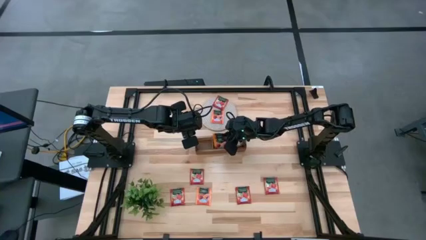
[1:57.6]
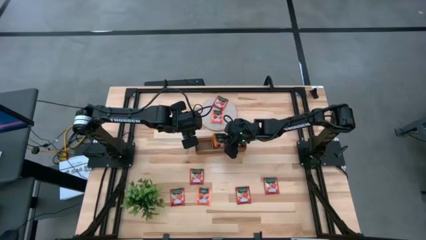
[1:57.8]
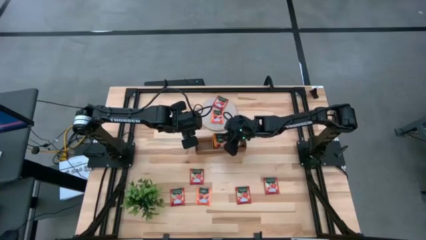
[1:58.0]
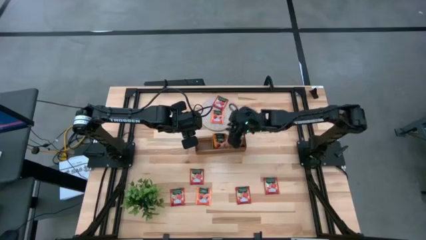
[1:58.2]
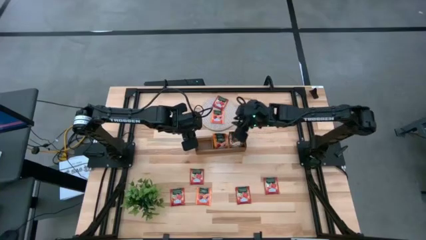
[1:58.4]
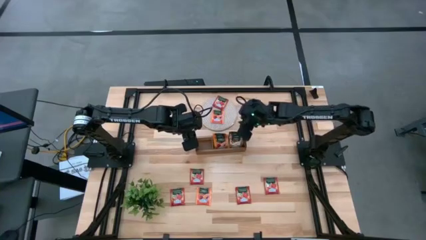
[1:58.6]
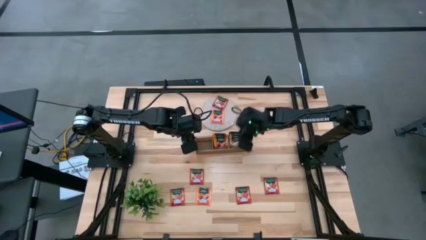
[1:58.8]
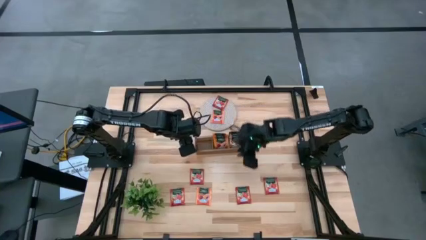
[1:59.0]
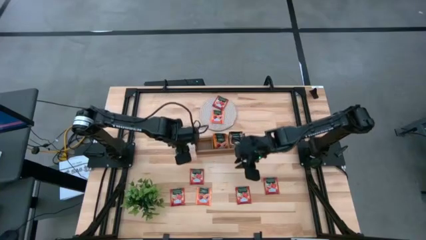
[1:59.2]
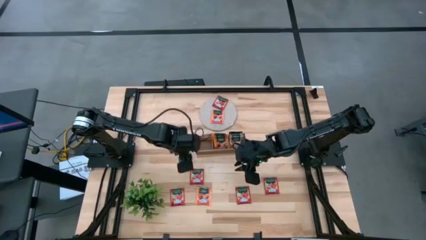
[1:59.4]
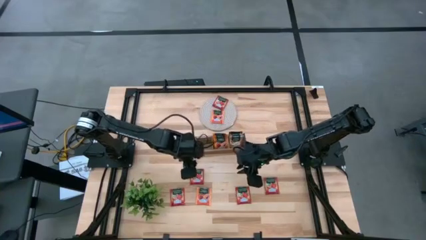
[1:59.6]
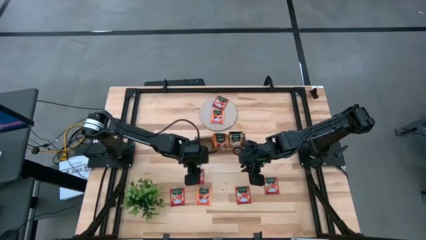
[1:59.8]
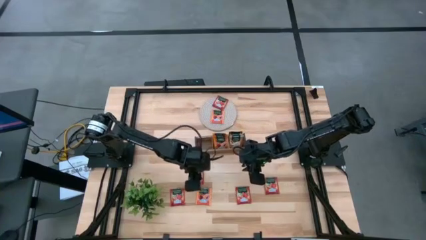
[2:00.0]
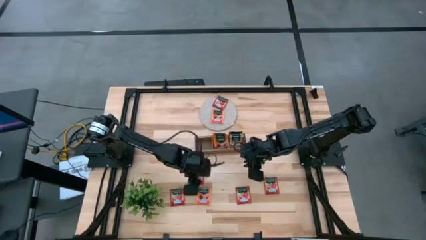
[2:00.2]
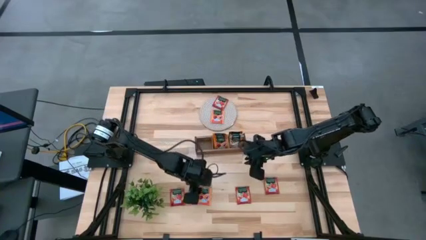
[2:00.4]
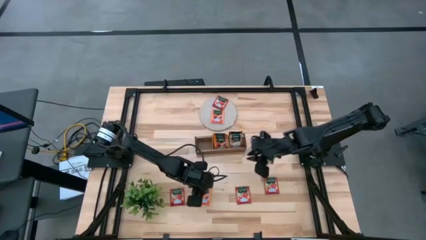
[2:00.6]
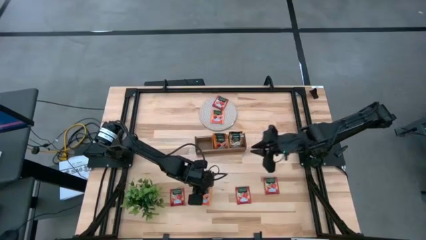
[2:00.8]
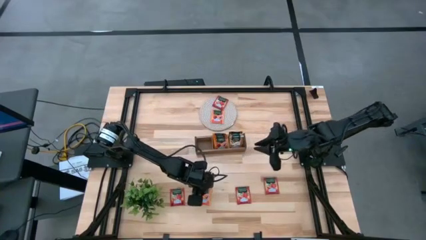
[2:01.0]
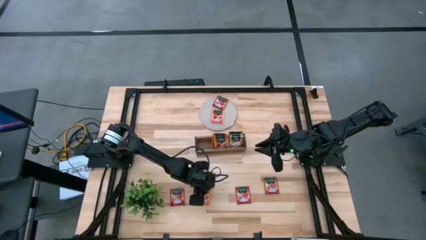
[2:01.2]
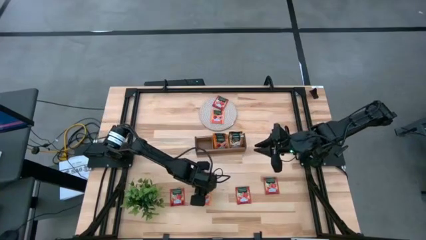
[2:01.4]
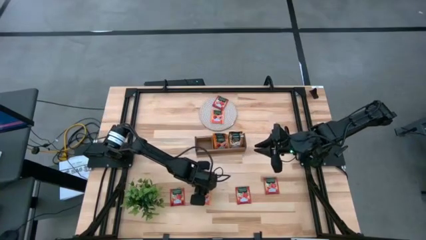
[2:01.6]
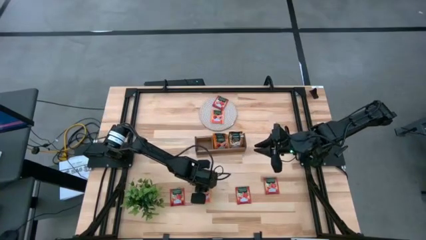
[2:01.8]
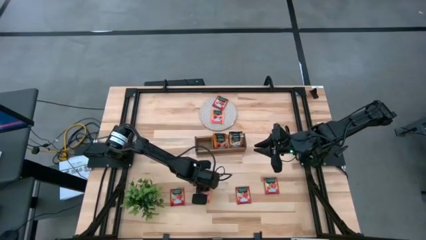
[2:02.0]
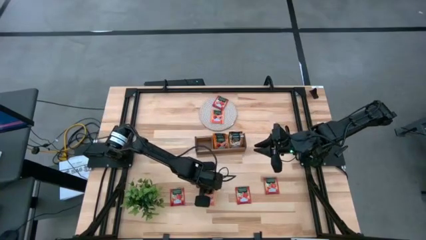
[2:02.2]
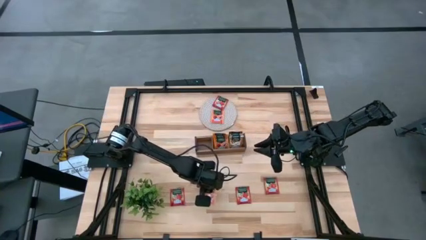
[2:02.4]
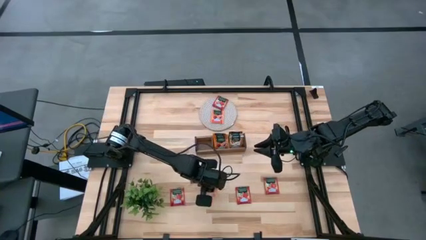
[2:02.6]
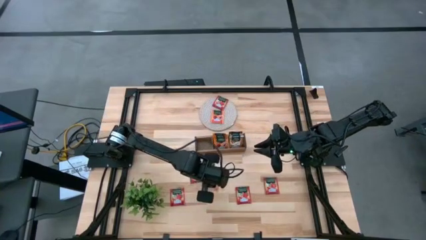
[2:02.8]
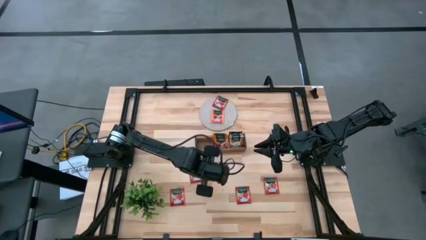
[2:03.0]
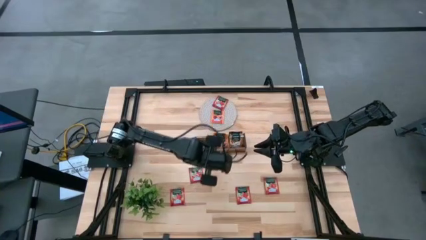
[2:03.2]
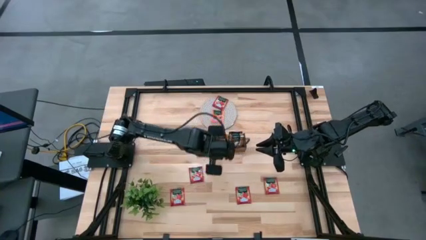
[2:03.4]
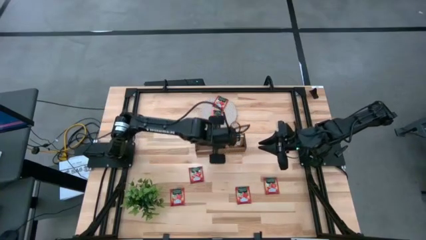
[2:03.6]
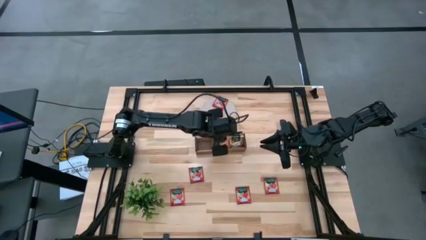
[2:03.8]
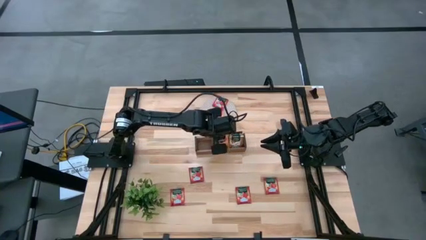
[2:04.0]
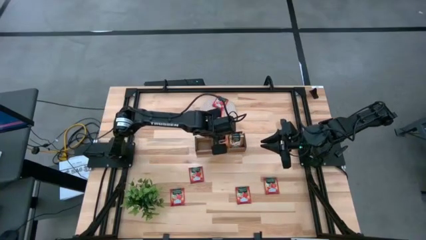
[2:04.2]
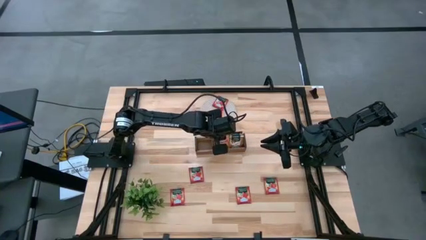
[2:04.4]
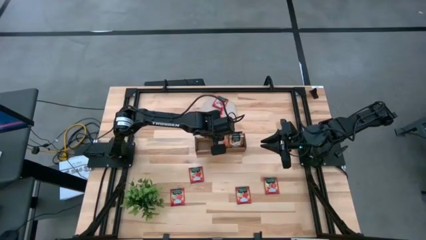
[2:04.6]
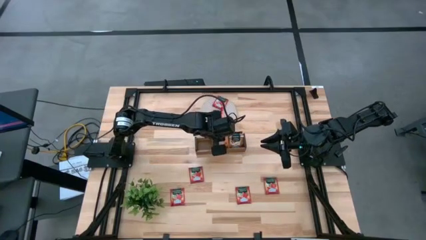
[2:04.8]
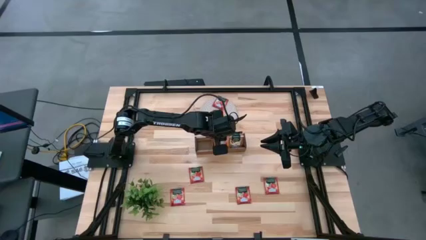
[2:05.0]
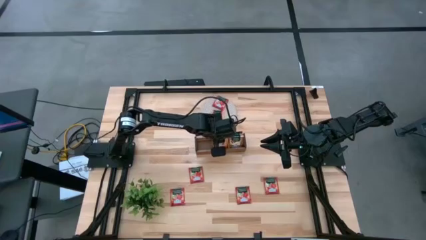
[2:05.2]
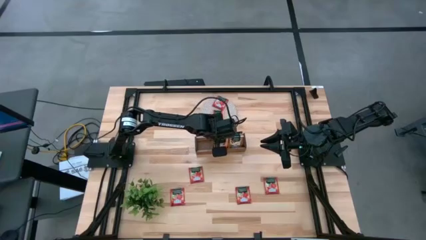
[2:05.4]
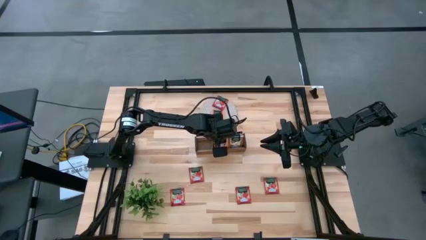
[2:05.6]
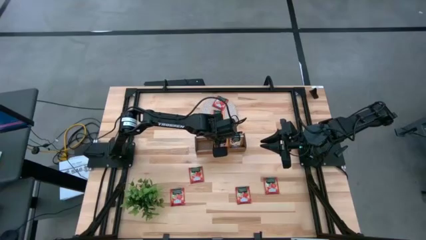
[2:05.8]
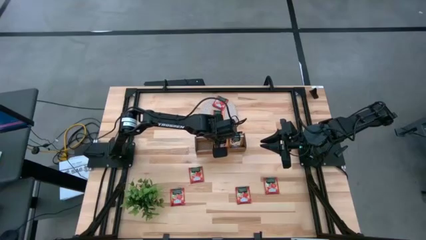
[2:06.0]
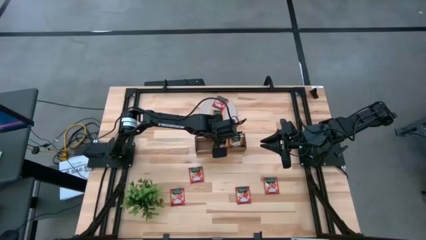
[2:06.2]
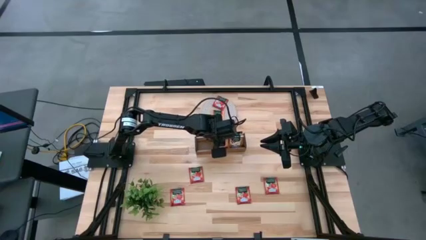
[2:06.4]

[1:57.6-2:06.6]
Task: Pick & Place Tea
Put the orange tea bag into the middle section of the wooden organizer

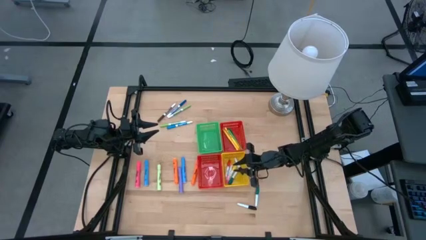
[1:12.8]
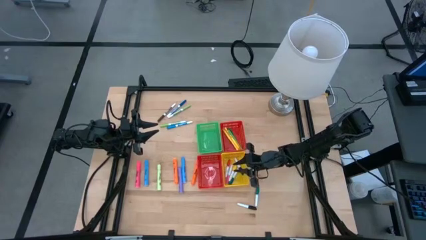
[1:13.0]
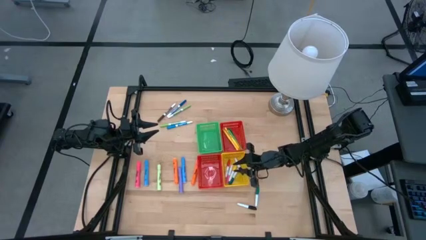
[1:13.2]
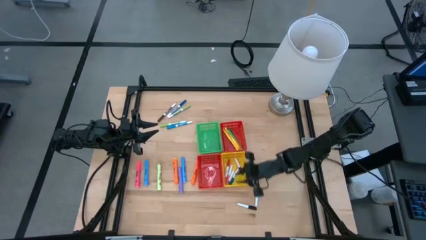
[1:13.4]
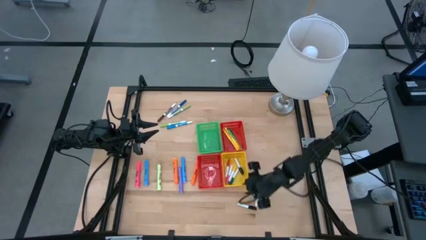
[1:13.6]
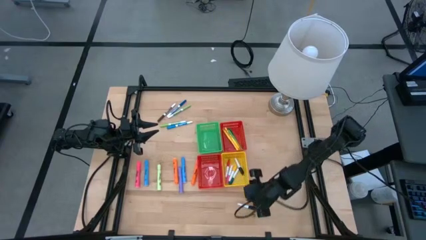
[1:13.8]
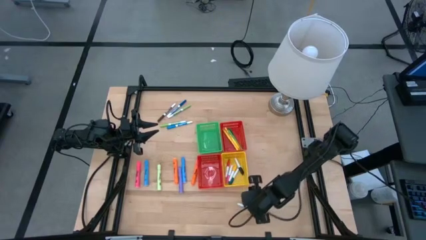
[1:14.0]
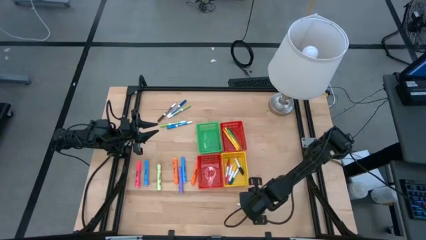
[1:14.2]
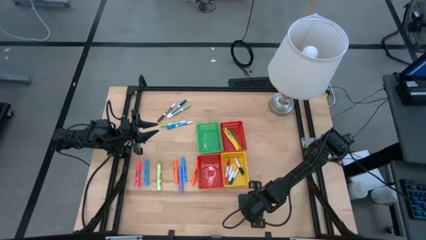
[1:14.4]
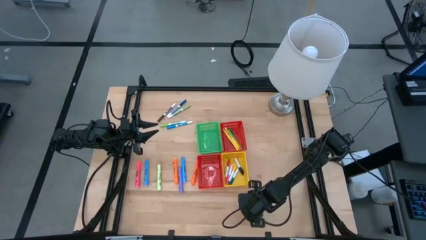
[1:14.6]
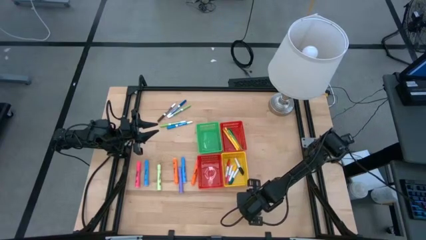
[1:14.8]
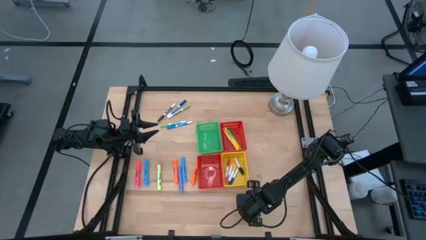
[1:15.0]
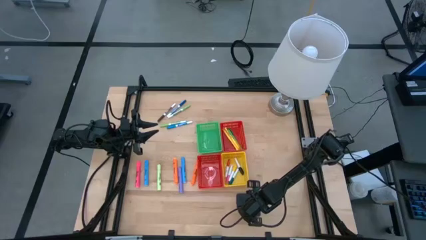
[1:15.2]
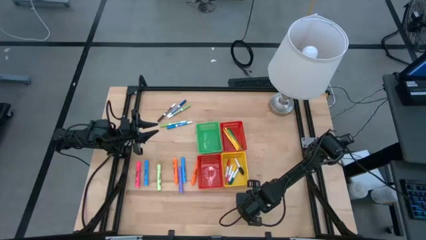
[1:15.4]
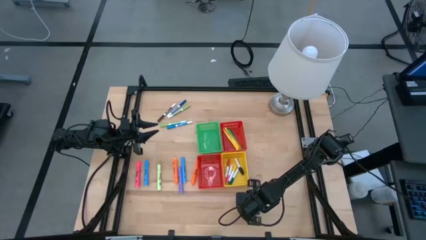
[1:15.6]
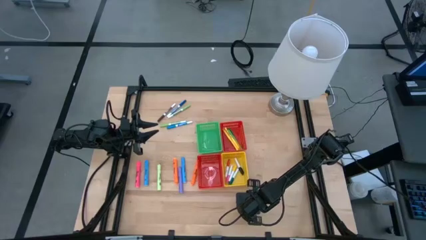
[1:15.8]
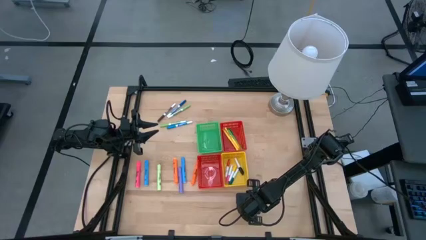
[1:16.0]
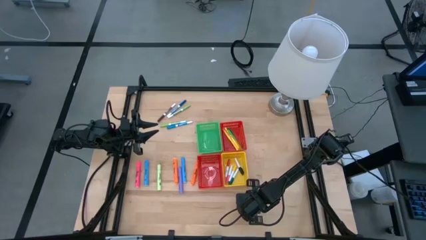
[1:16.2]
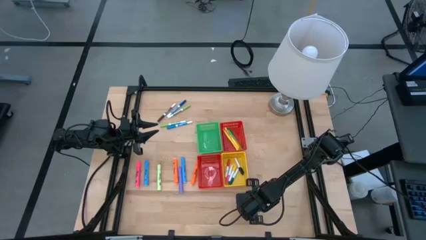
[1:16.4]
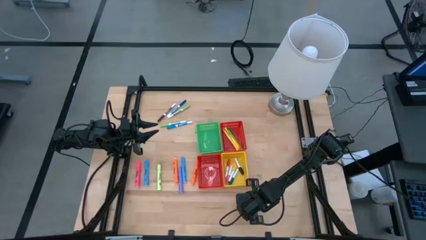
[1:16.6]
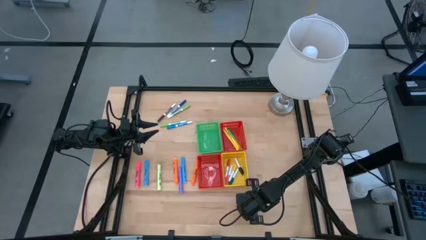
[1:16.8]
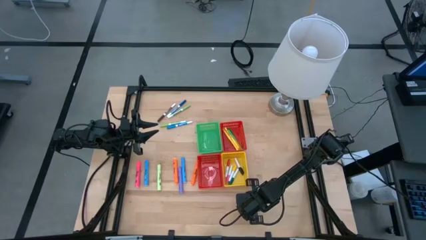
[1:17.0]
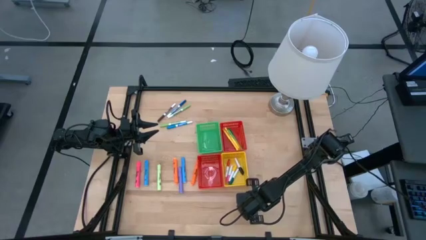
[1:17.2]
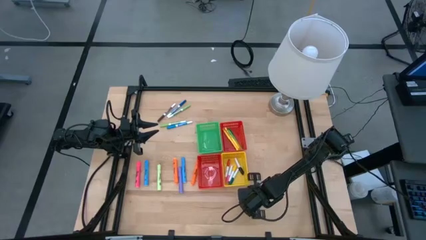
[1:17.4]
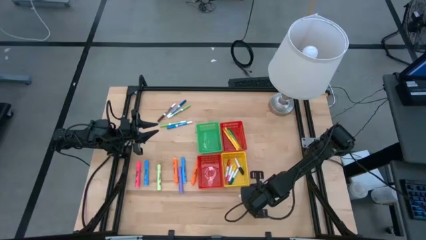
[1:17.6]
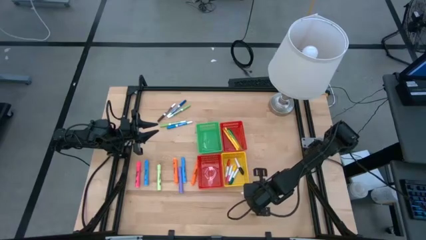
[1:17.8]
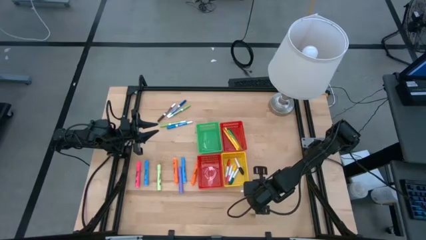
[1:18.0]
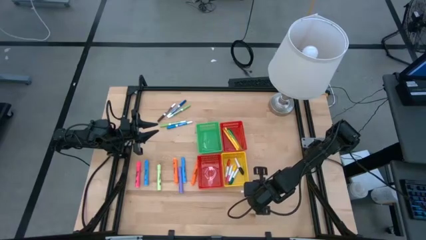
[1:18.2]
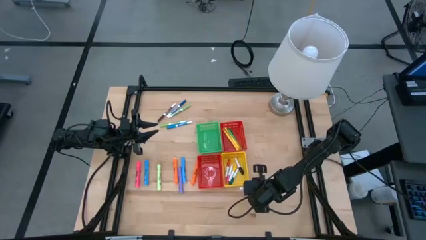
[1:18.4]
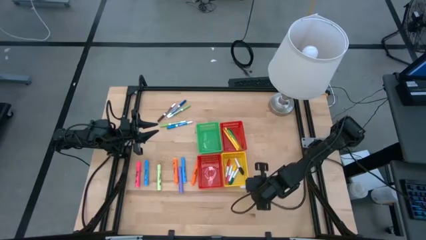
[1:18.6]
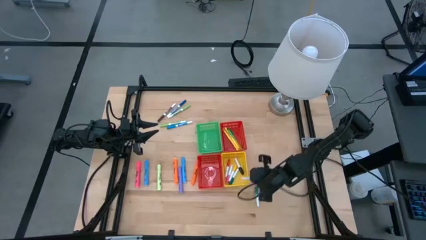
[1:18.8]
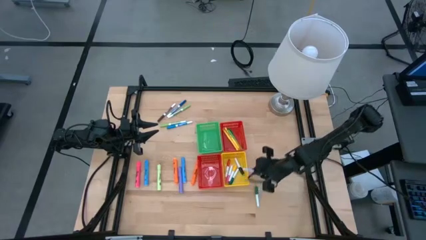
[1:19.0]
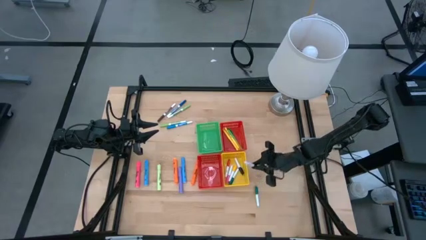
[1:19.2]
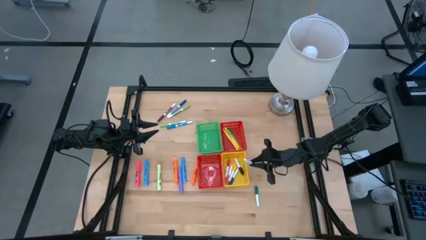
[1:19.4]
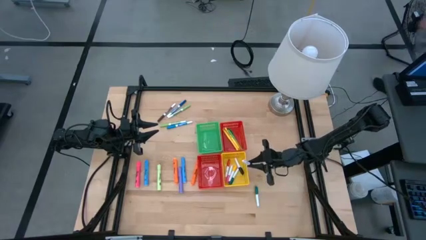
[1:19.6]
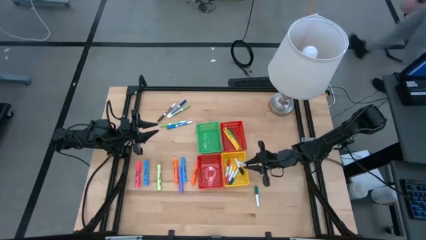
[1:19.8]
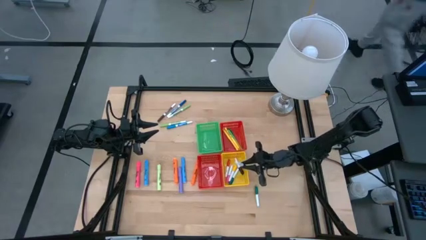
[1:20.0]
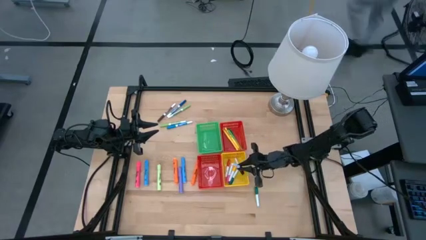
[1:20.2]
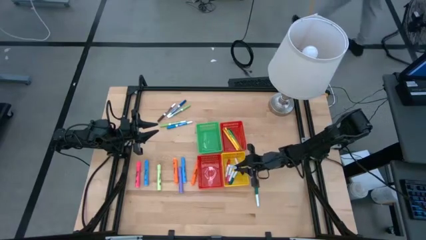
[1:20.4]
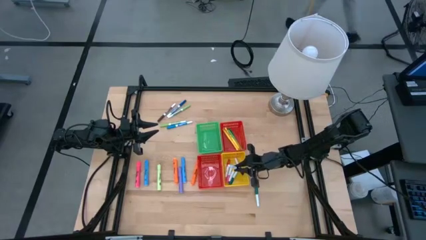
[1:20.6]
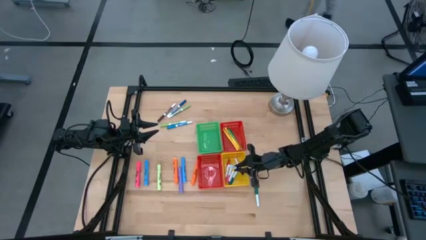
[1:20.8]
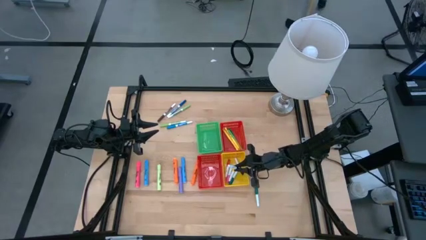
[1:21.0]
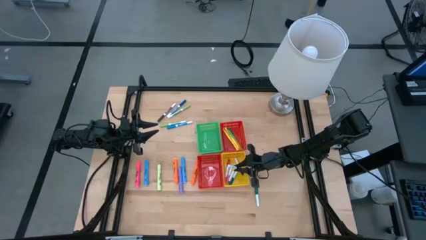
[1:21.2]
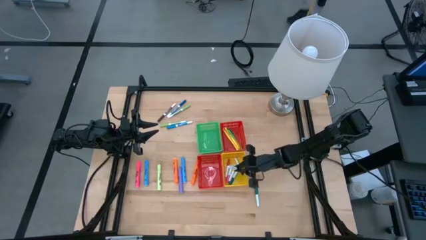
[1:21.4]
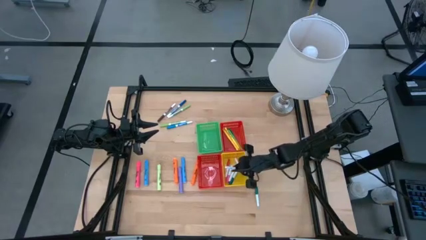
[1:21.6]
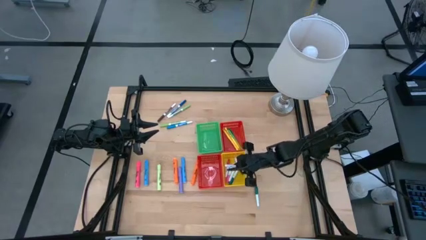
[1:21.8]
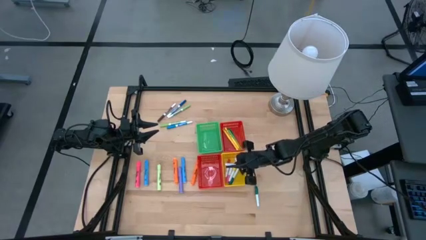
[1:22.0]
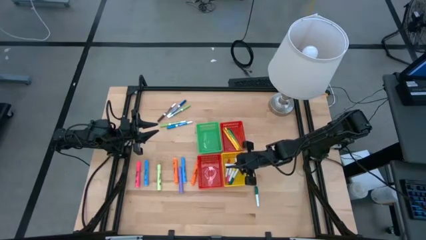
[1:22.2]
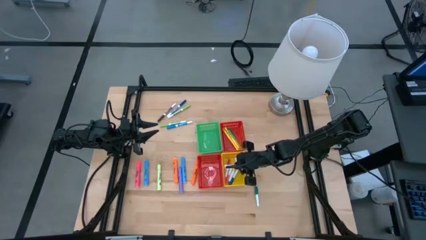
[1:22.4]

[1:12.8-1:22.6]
Task: Pick & Place Markers
Put the small black highlighter pen into the yellow bin
